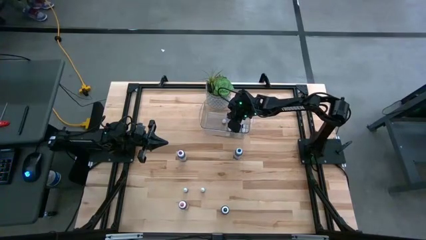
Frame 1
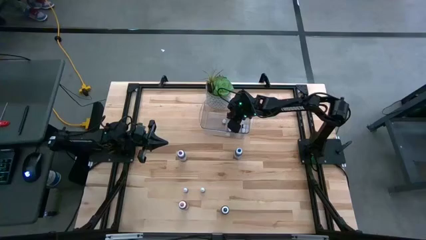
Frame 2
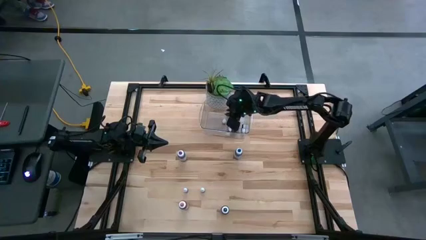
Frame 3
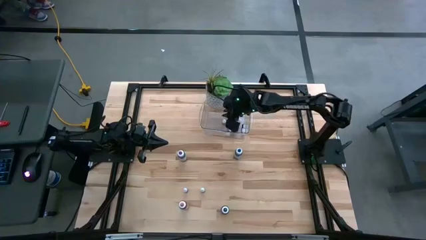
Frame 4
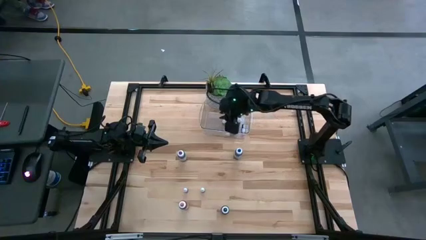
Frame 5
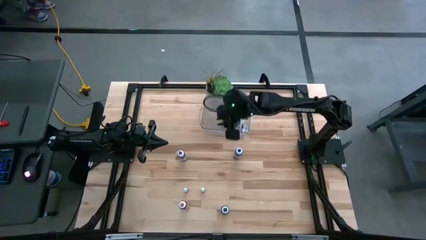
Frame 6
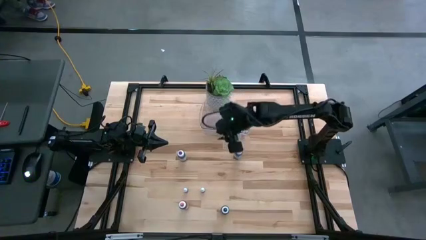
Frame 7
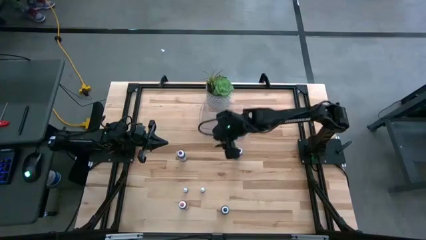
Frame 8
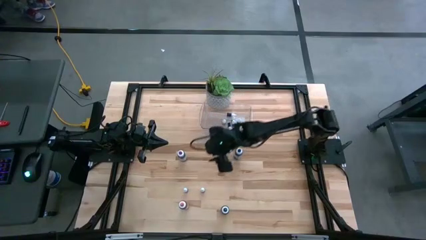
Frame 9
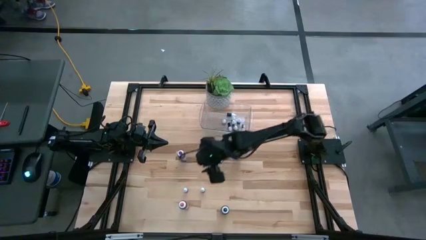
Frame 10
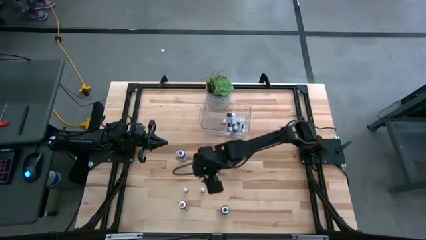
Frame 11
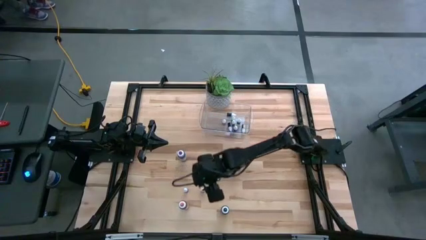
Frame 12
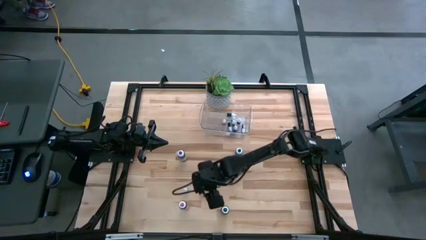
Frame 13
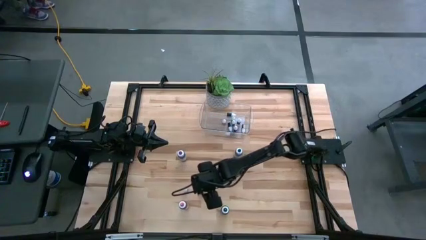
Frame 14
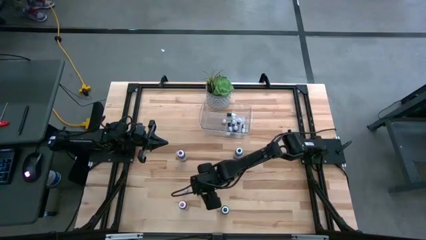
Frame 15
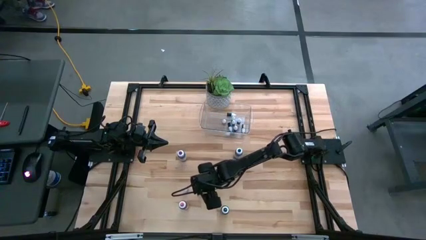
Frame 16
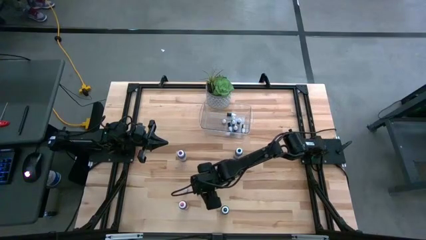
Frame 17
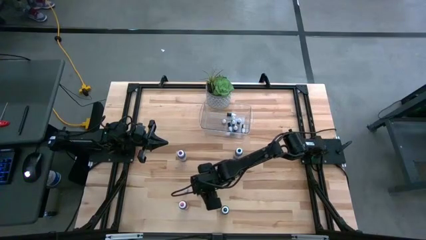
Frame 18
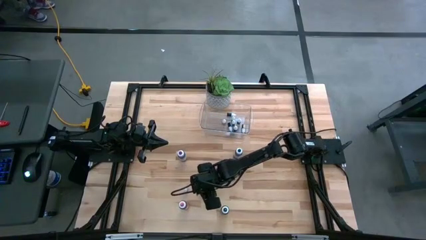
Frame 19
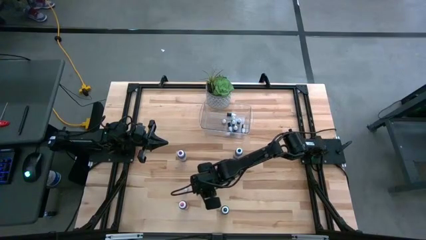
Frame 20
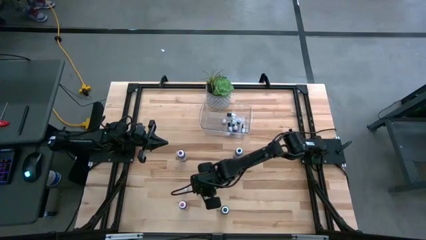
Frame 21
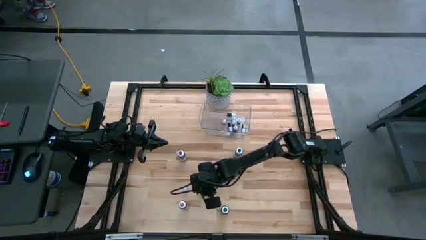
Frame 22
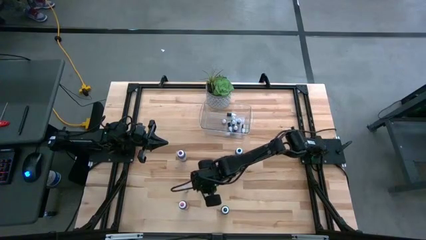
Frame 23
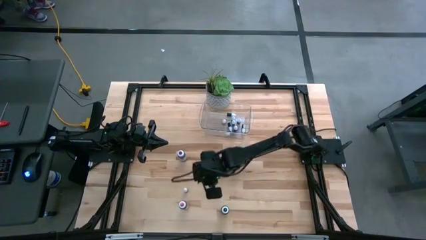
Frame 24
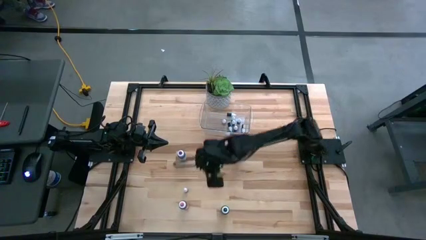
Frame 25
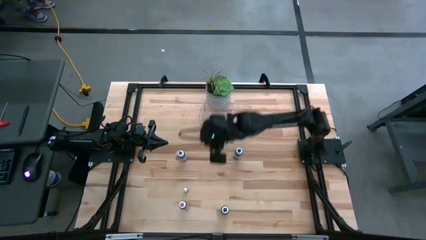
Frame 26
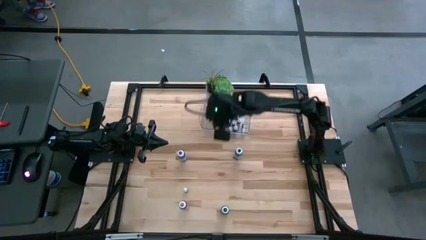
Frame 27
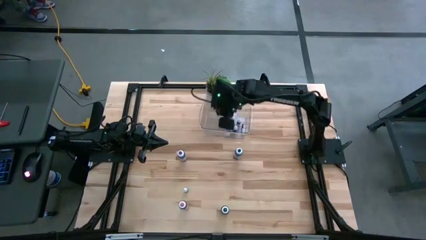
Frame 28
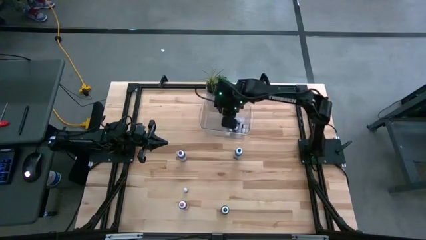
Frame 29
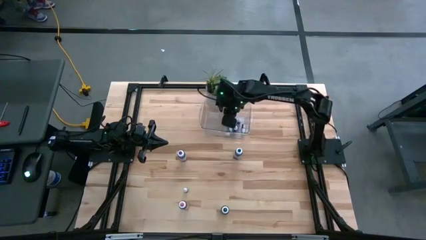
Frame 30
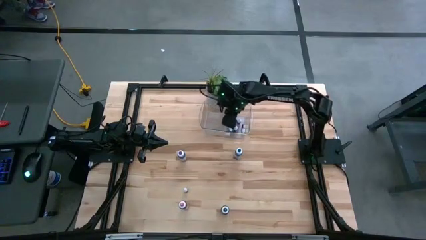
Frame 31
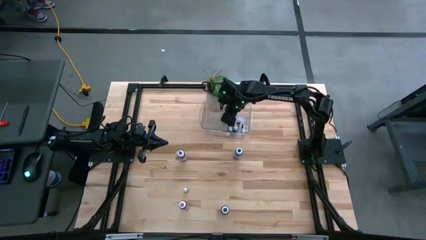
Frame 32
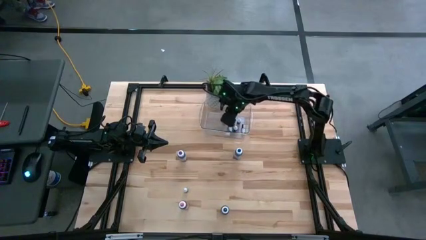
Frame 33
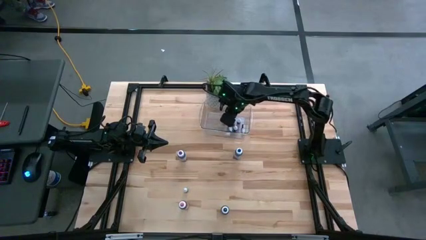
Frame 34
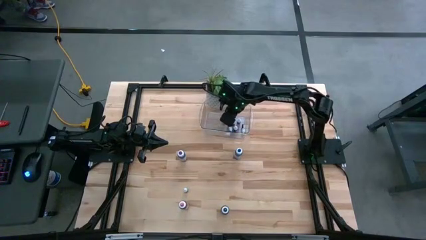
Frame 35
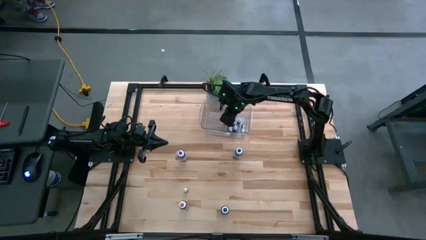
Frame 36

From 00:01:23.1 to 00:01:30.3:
Task: Pick & Place food coloring
Put the small black food coloring bottle into the bin

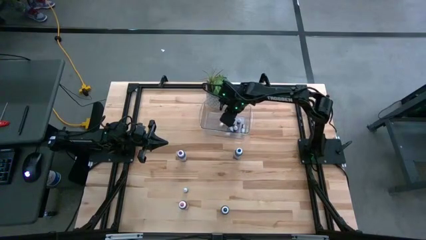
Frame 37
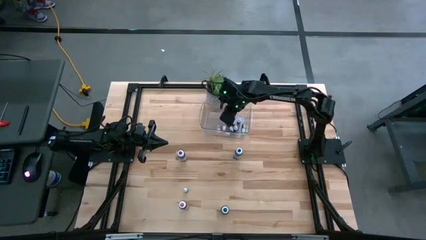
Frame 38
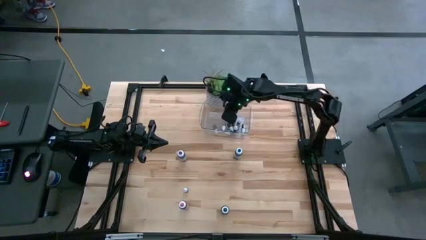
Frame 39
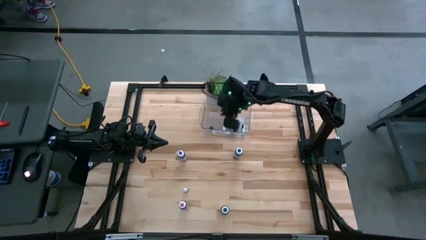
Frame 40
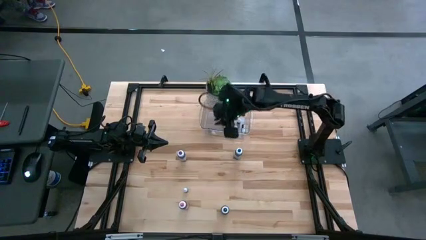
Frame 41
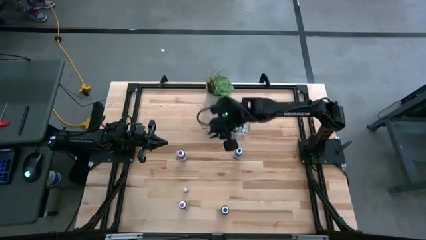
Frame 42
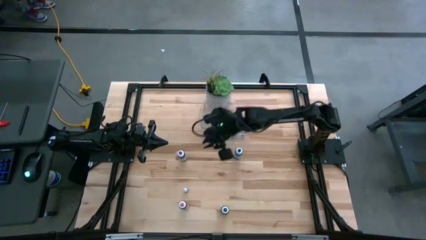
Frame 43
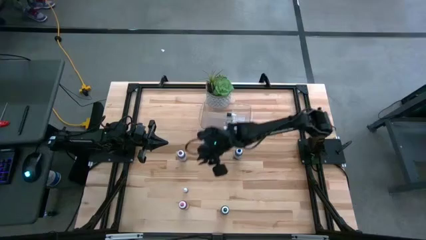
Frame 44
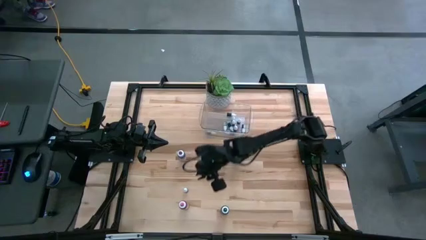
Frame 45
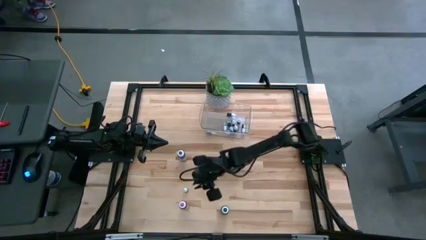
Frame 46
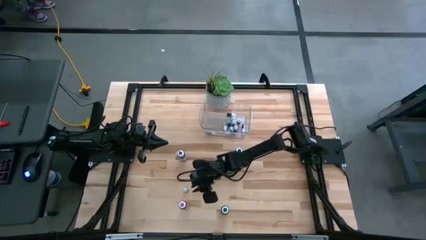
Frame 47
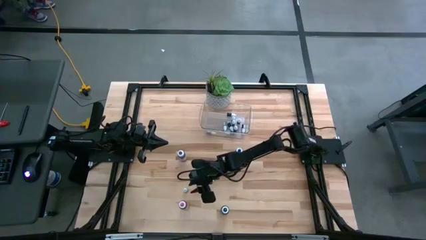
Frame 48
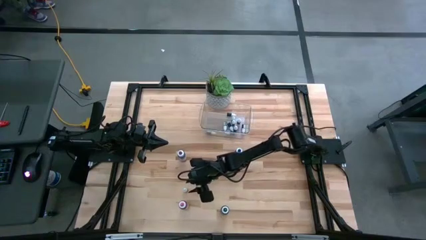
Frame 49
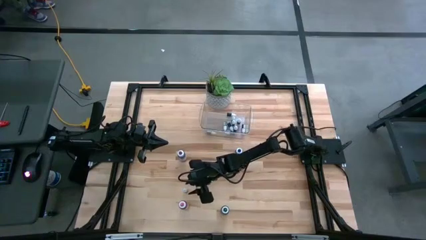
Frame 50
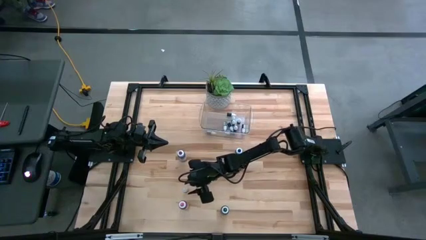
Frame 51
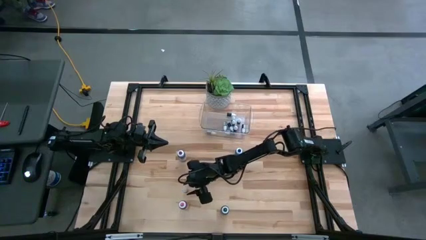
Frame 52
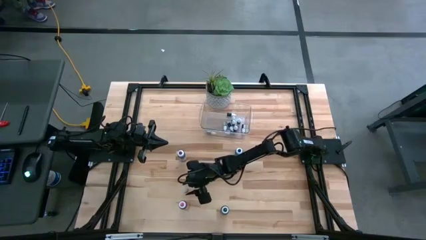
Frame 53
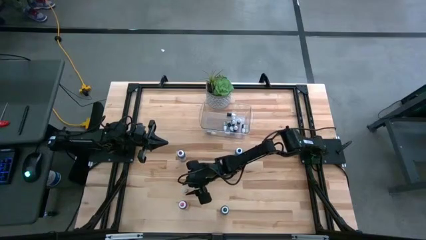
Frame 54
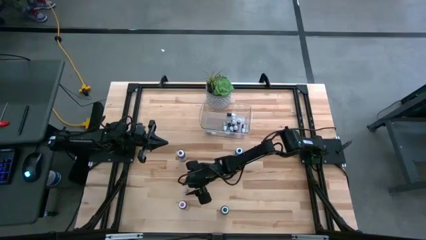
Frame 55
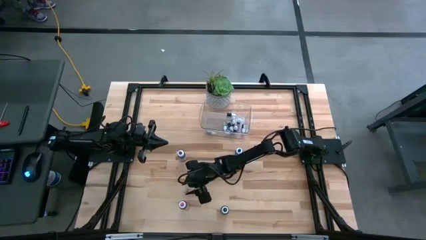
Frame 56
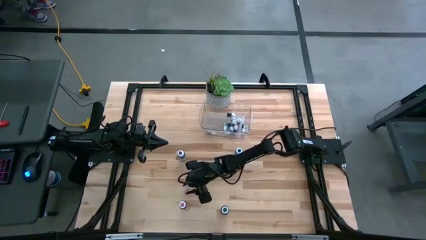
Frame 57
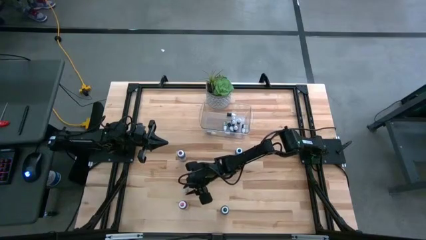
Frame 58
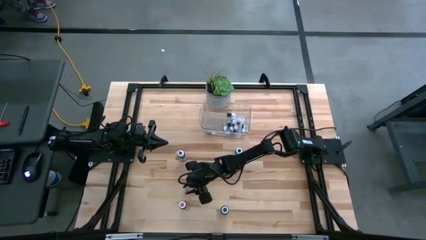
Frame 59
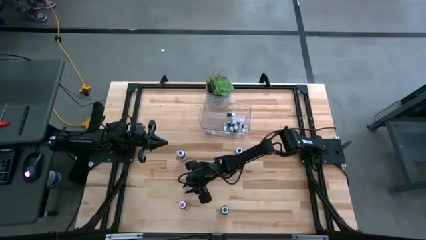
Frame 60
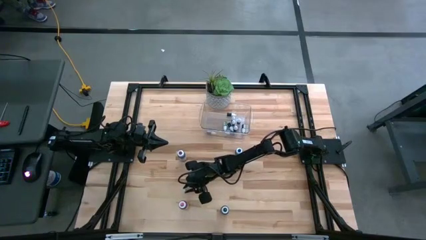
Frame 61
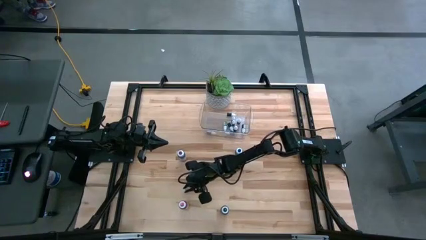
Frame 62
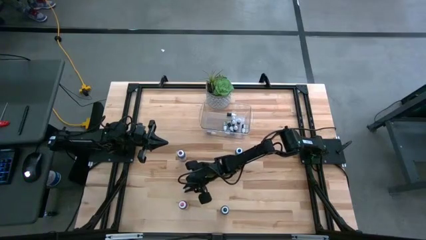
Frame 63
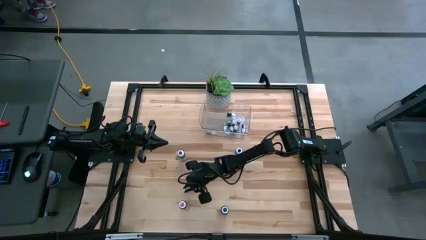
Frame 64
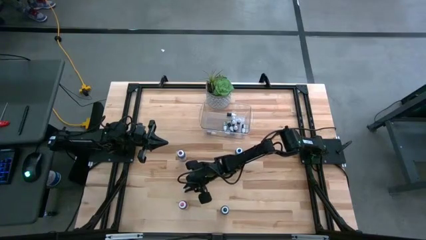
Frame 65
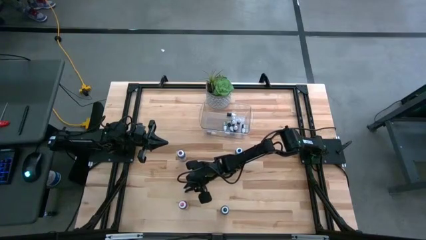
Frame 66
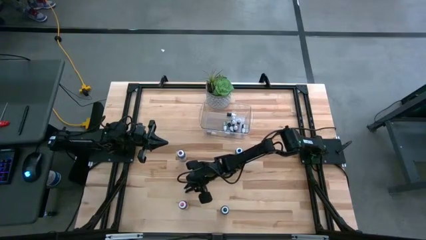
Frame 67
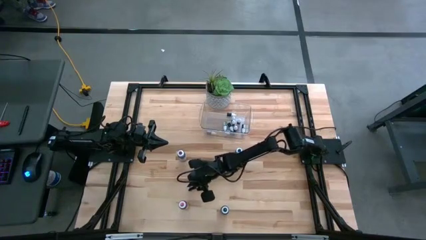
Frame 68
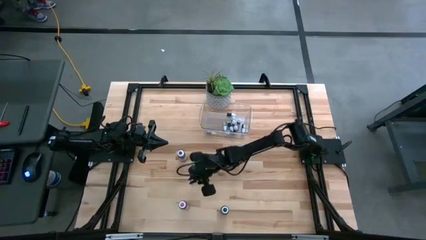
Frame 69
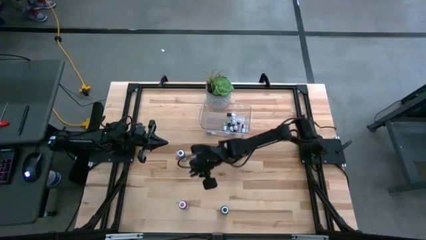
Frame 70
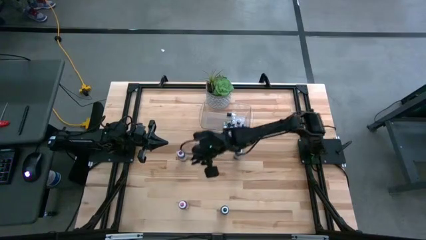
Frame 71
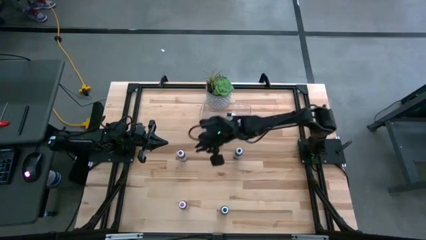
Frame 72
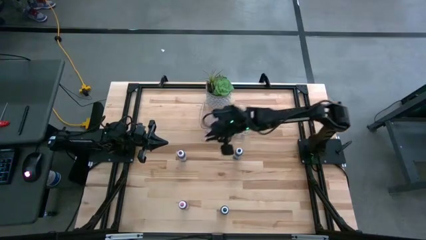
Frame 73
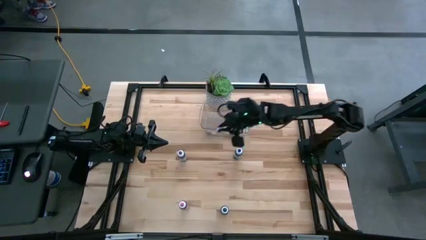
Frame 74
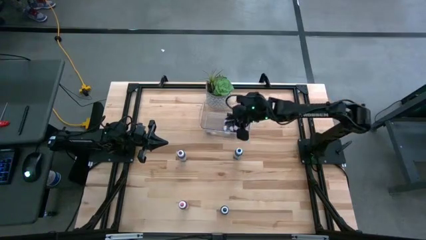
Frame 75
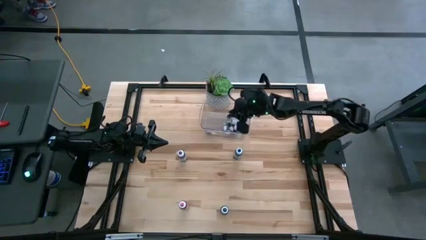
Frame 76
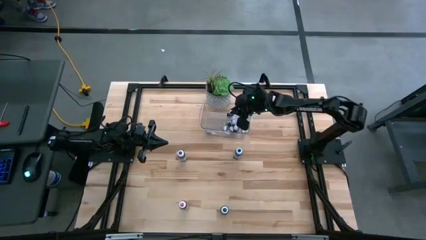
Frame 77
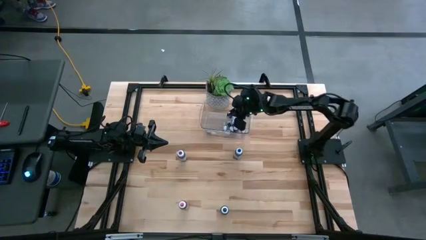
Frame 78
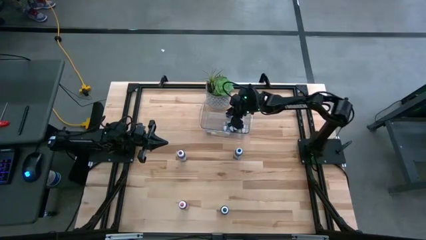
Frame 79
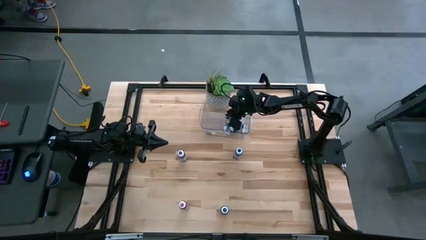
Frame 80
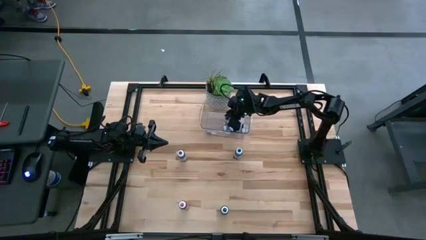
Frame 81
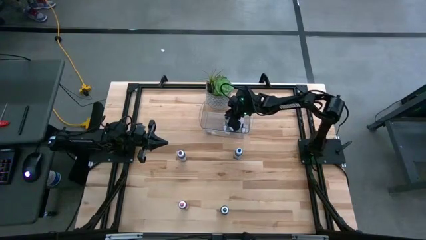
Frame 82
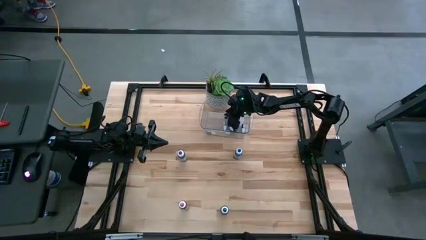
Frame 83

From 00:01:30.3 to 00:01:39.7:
Put the small black food coloring bottle into the bin
